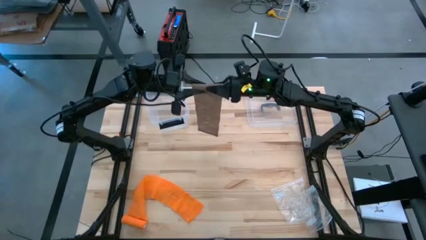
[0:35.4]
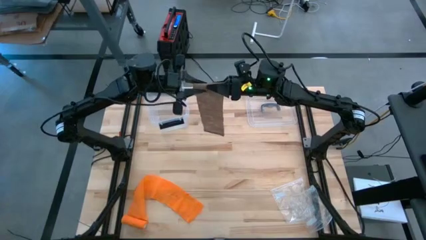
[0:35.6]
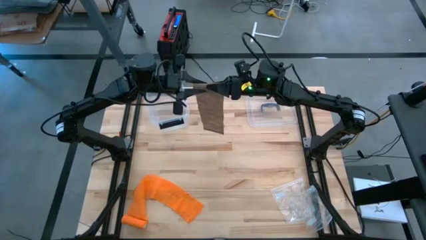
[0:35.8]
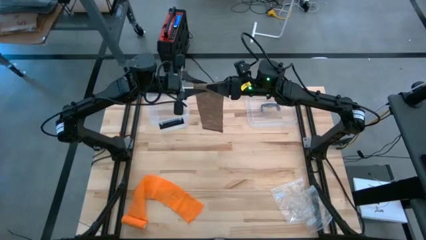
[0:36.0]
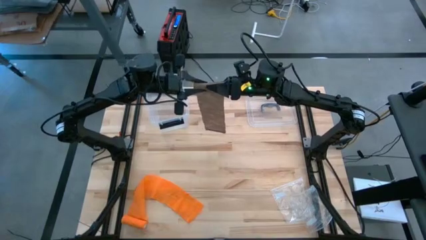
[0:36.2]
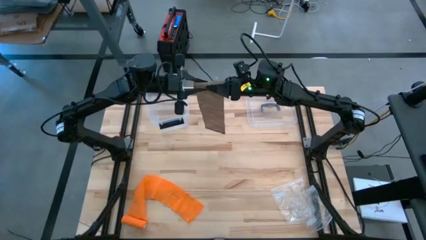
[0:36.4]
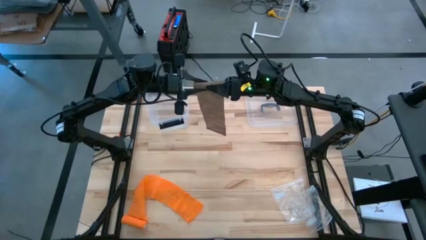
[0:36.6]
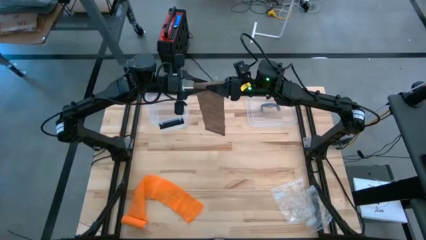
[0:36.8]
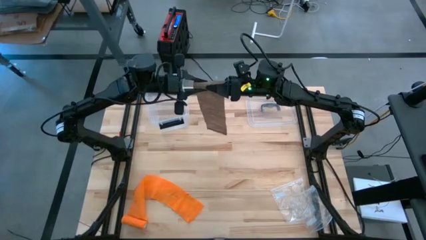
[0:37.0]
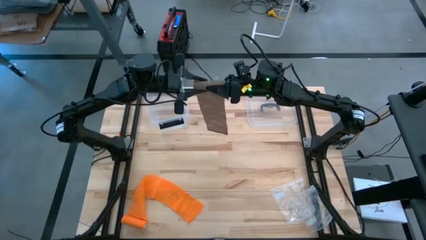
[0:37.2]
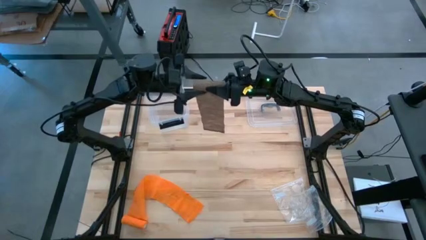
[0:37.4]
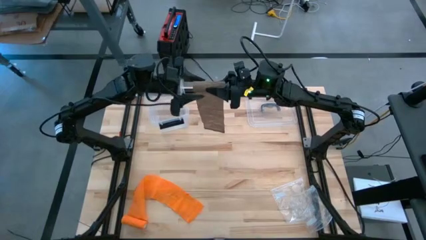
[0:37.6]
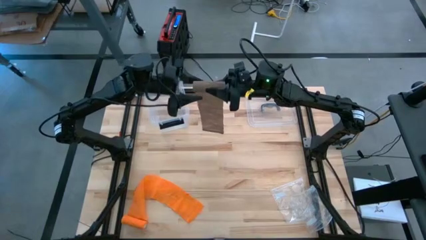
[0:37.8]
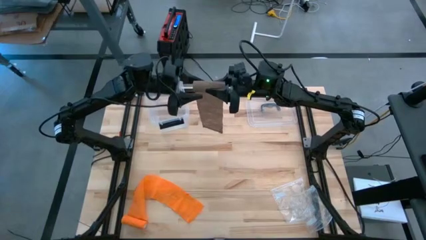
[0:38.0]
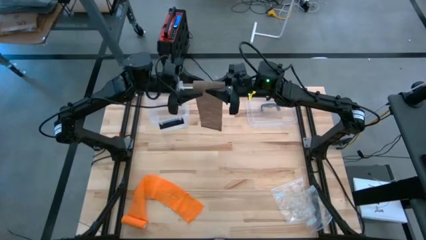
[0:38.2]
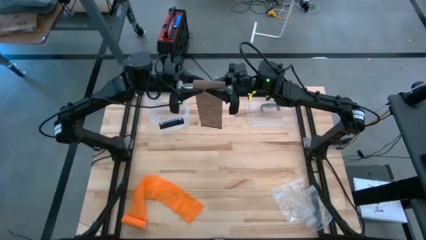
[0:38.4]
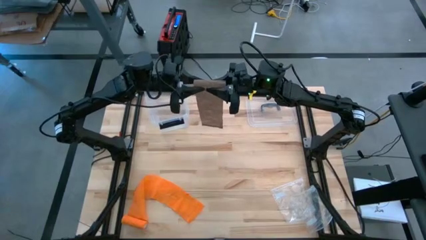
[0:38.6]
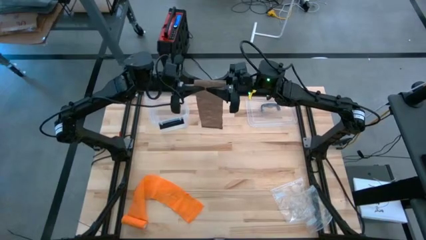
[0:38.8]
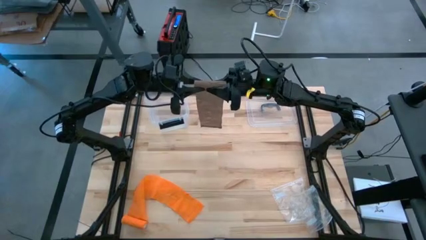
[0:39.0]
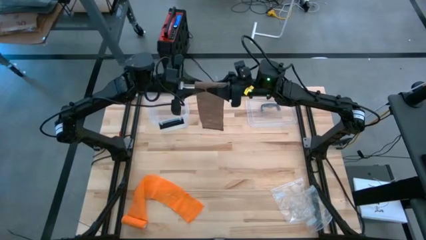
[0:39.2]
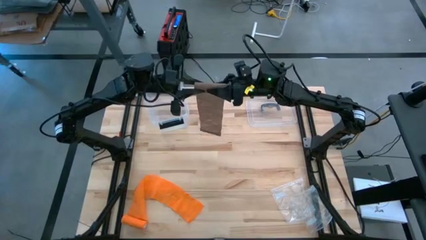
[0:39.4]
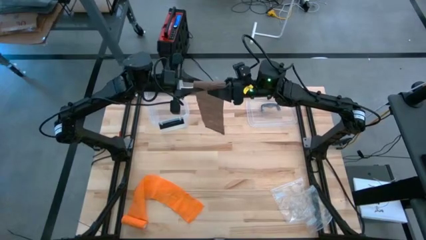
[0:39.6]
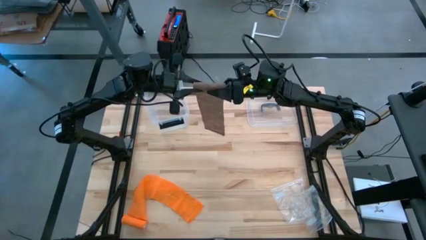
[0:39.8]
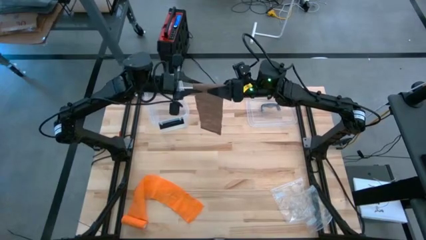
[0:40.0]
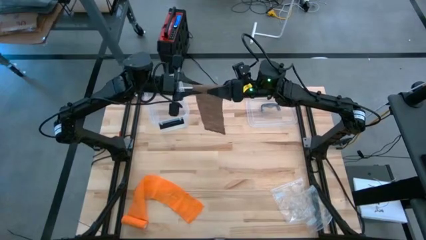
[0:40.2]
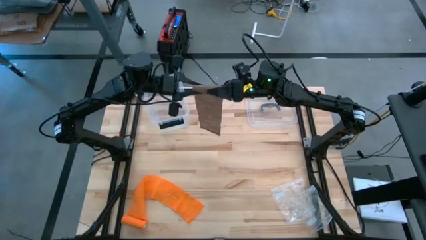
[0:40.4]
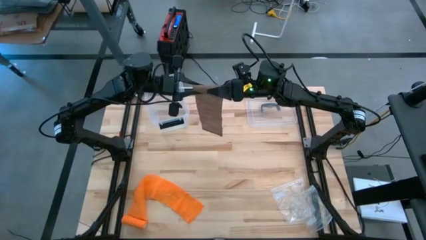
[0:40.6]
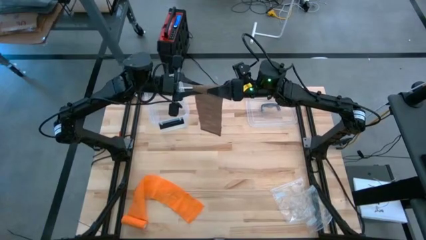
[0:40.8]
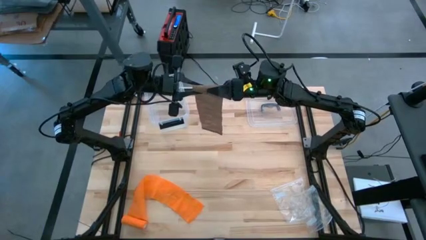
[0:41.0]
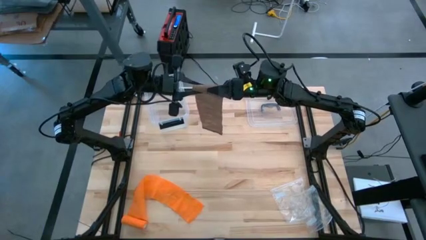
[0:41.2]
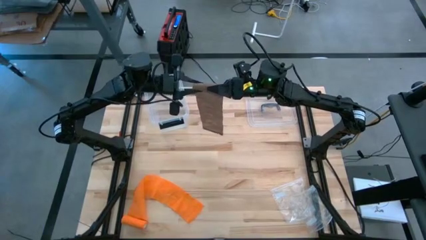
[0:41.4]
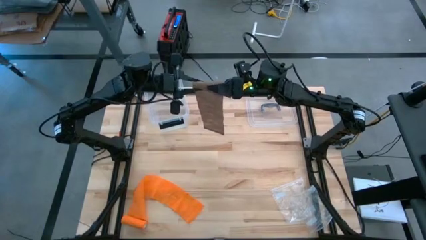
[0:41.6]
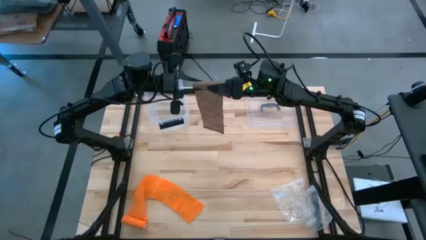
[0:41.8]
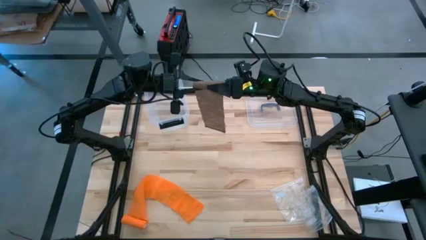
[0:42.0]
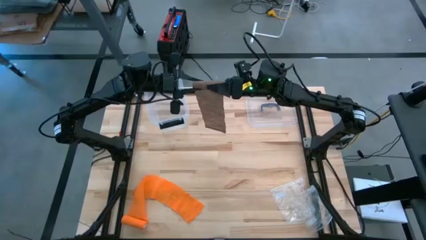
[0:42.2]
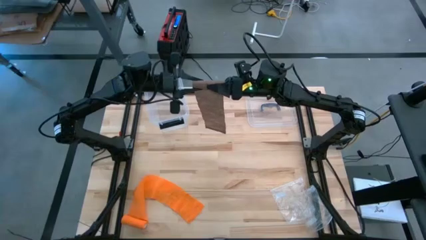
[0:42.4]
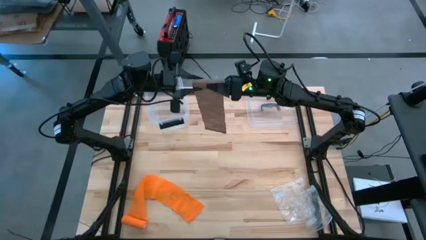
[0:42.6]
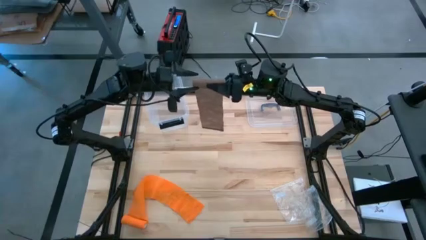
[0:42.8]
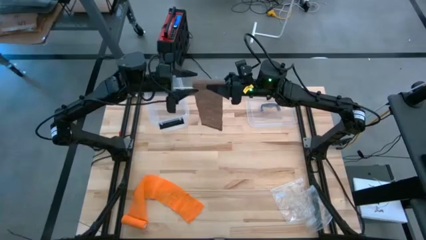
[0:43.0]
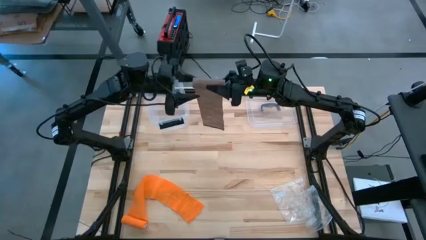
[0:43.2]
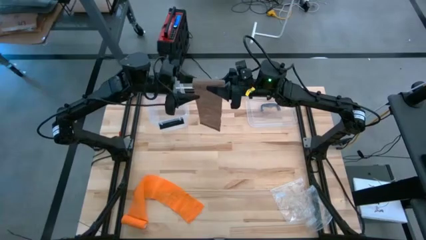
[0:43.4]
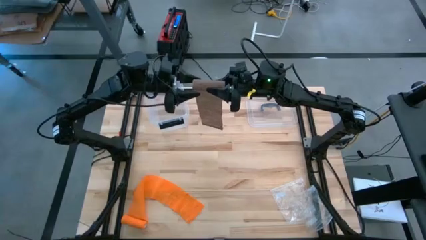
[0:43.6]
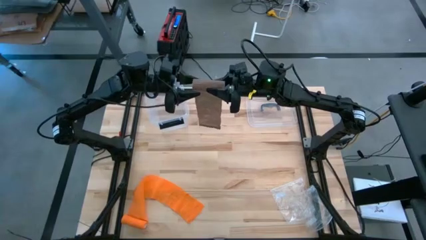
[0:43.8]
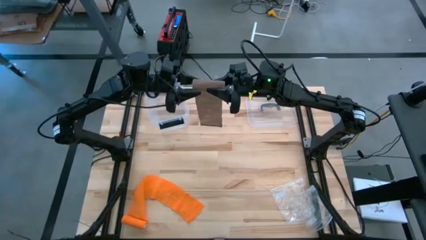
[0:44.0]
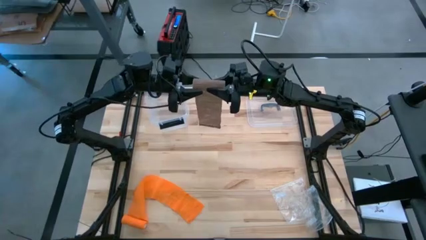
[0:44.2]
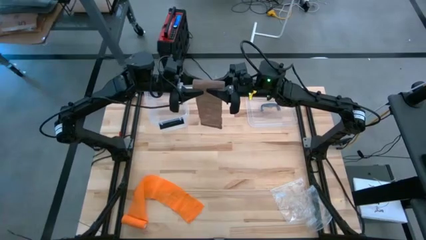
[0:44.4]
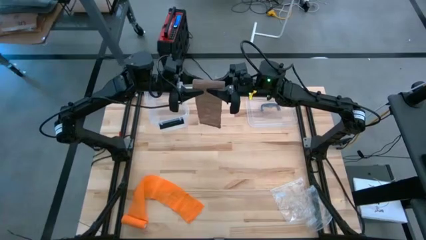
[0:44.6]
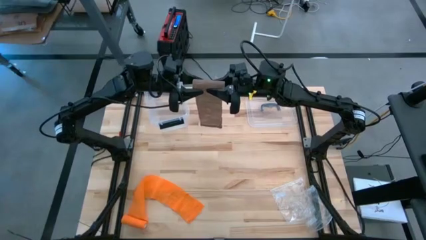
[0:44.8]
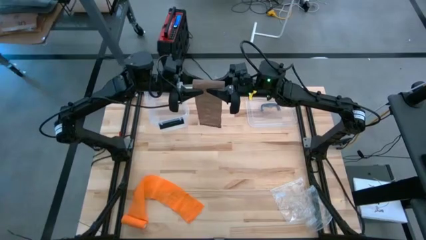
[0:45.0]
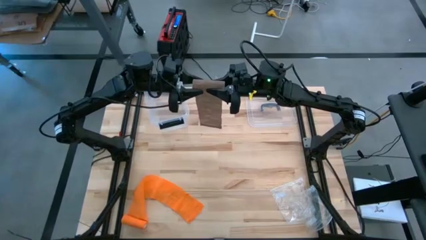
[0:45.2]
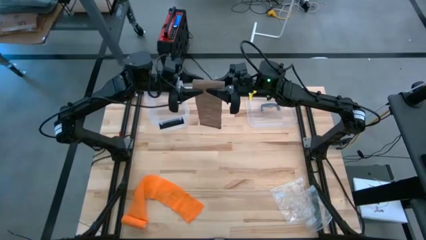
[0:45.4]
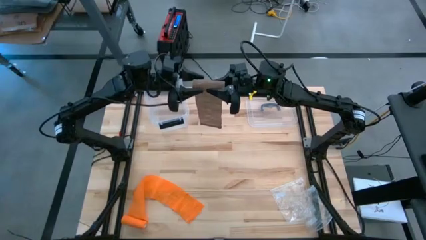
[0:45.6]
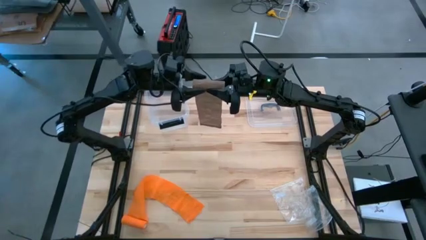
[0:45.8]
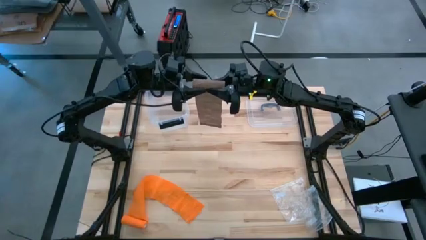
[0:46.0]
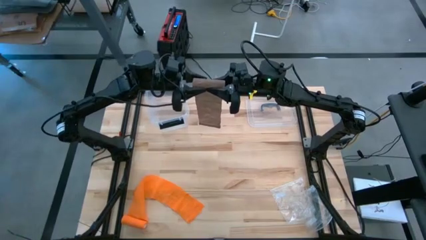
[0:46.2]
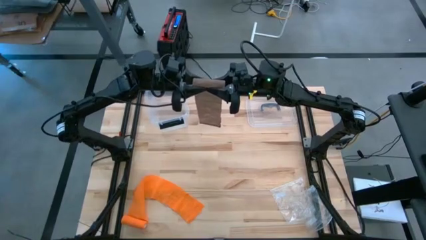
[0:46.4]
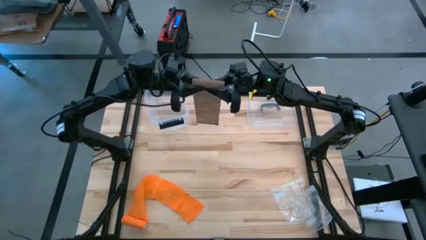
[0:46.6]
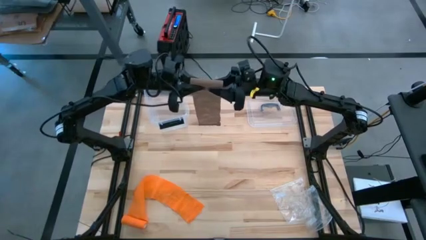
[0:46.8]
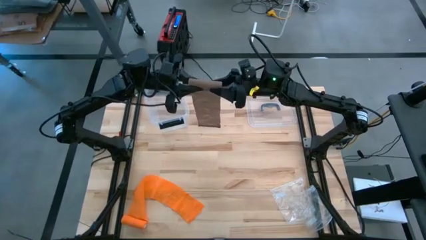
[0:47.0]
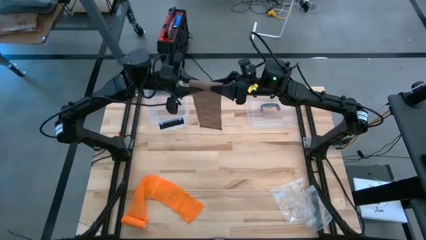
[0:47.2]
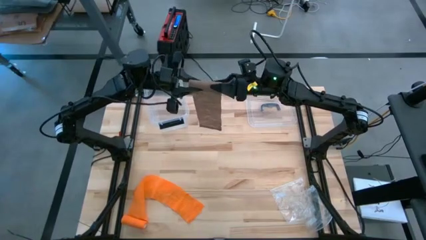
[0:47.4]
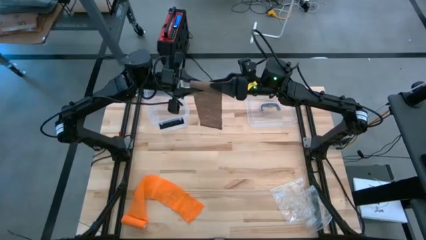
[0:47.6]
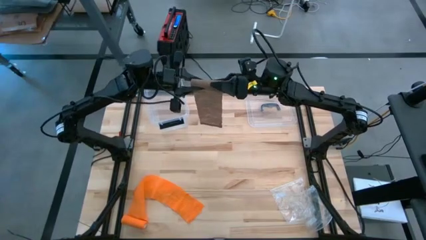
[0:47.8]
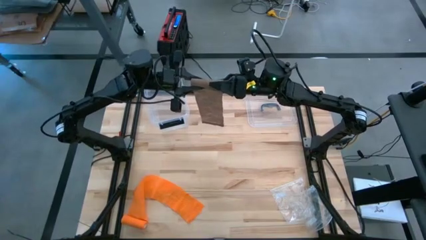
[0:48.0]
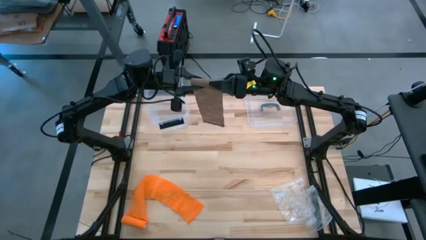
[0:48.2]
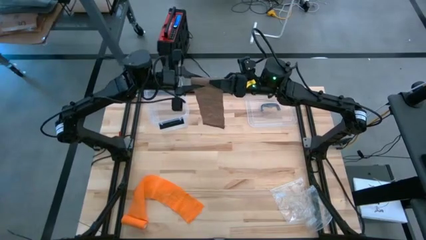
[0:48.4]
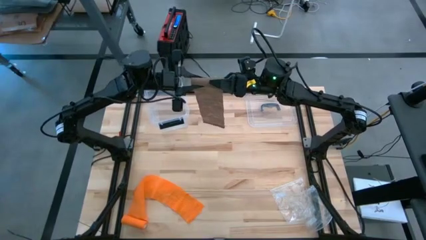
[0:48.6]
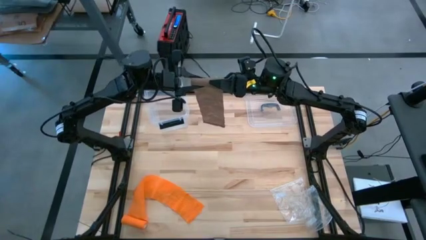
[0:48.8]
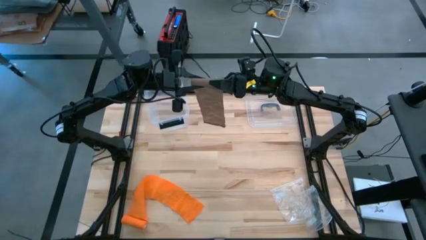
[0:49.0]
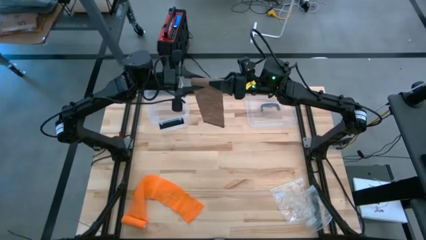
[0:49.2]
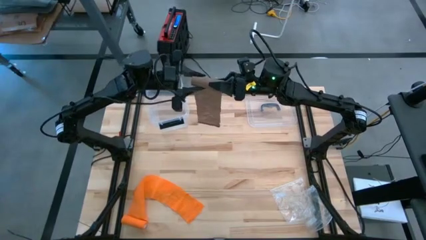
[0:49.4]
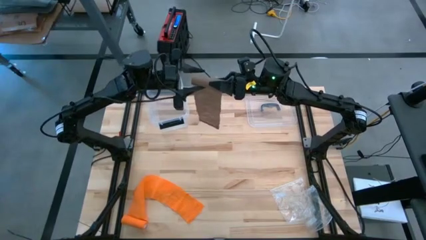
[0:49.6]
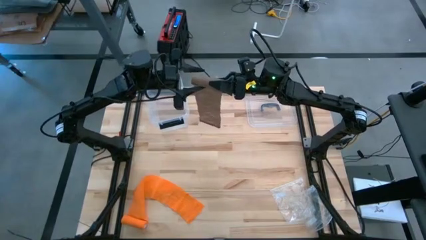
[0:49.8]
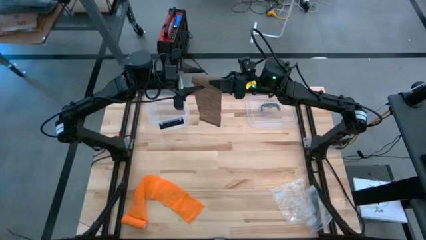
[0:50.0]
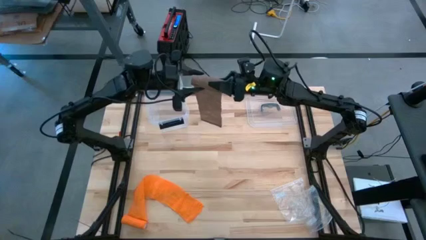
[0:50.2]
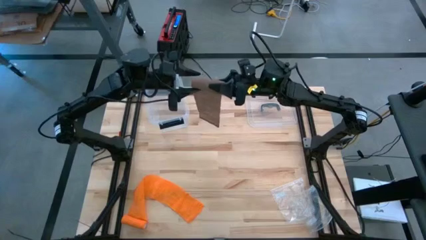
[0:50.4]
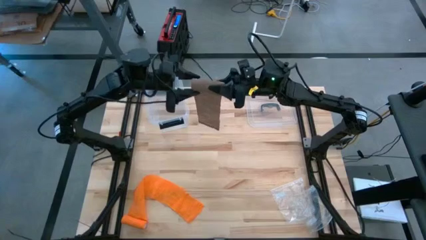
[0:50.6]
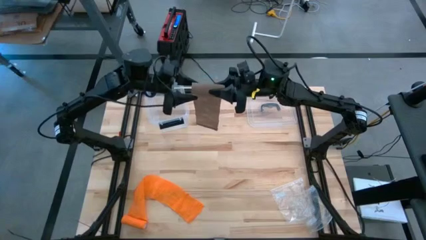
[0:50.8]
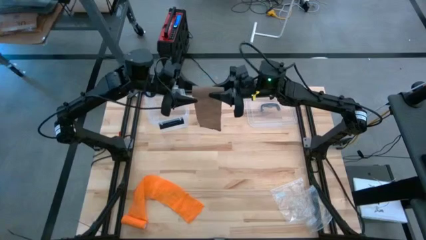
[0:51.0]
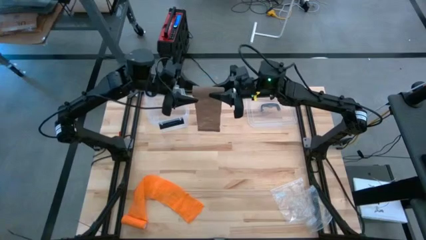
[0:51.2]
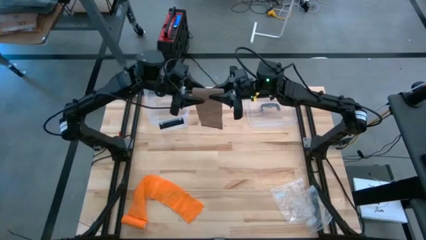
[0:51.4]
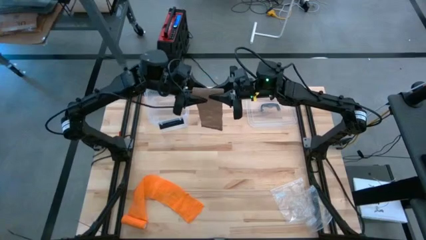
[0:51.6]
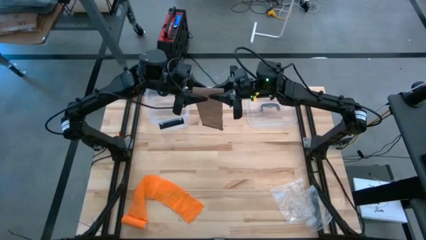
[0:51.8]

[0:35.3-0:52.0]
Task: Roll bandage
Roll the brown bandage
